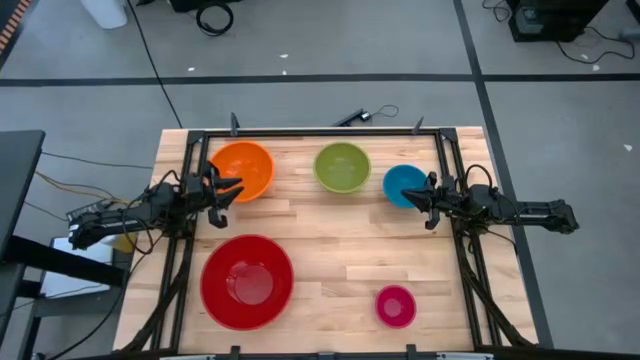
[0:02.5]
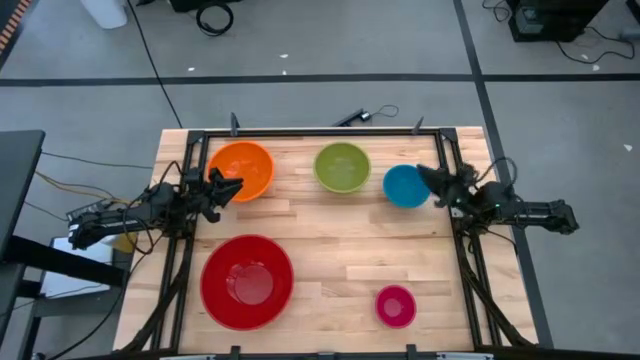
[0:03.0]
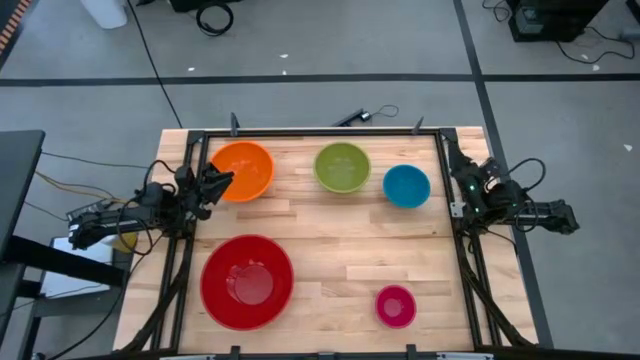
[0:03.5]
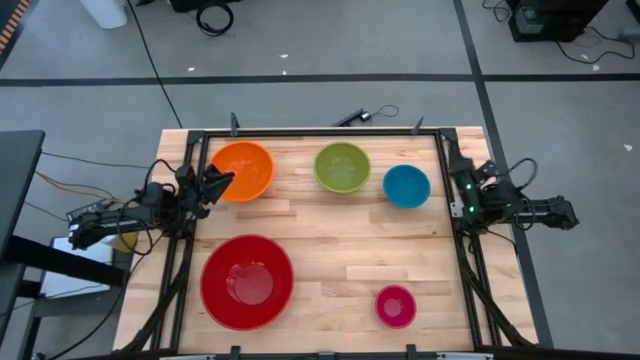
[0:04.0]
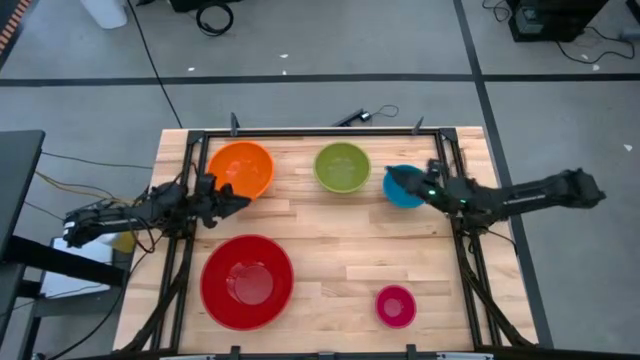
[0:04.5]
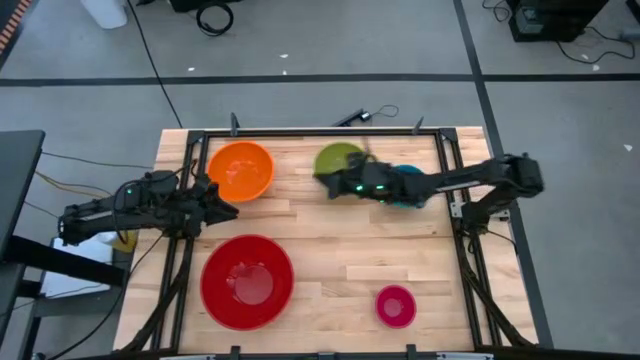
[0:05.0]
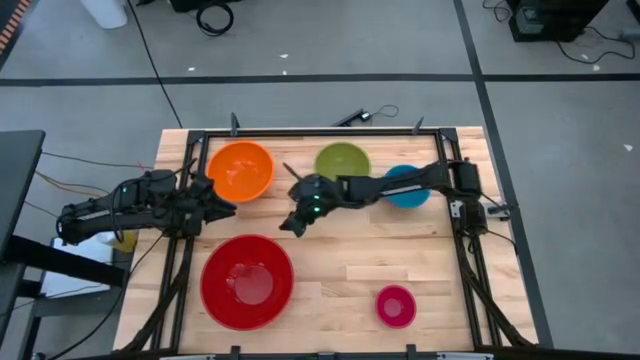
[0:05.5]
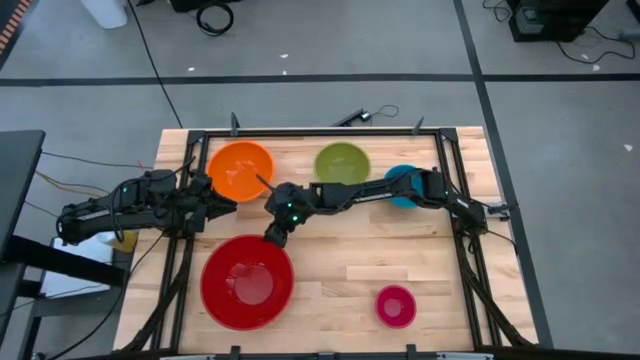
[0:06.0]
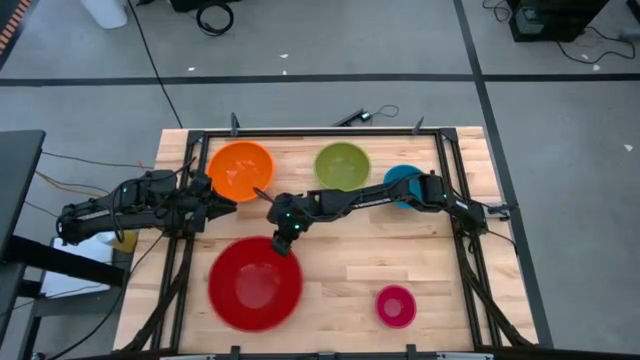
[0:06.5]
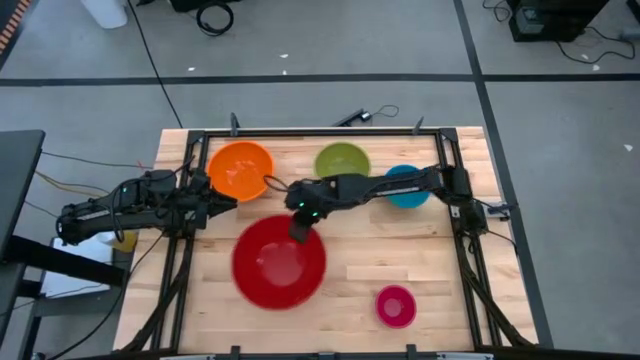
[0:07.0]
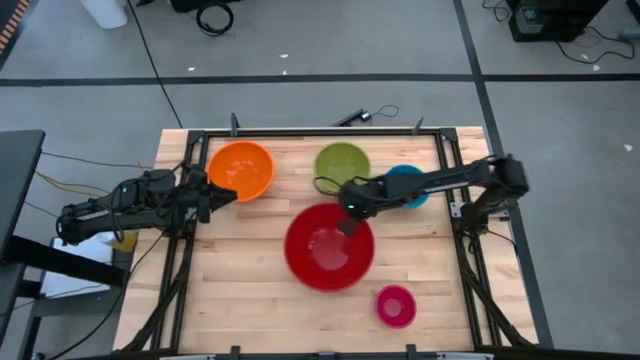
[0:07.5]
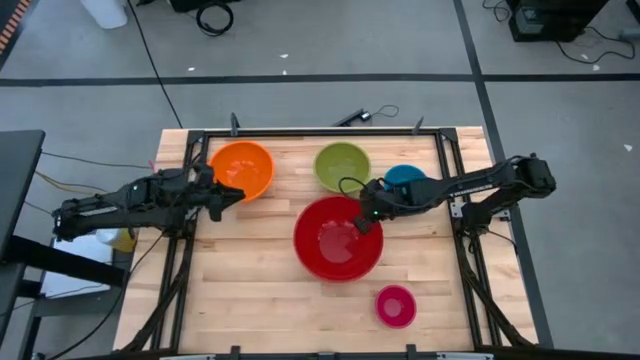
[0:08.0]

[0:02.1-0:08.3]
Move the red bowl to the center of the table

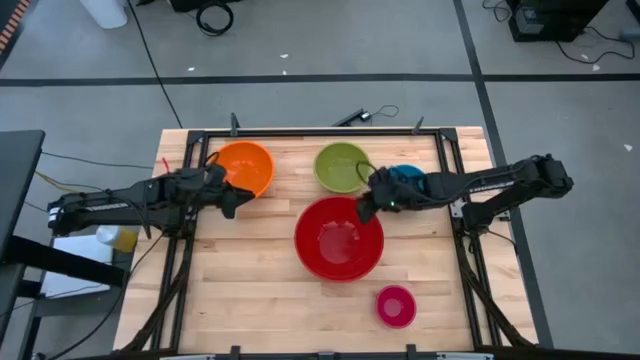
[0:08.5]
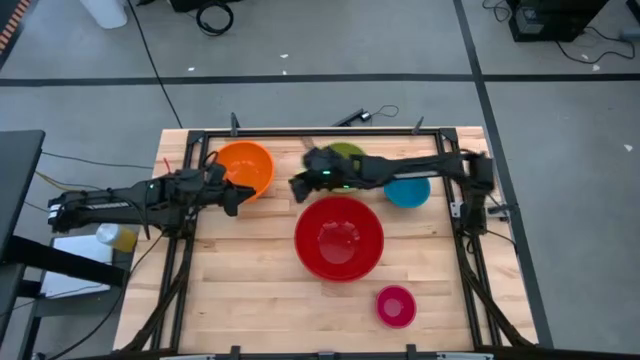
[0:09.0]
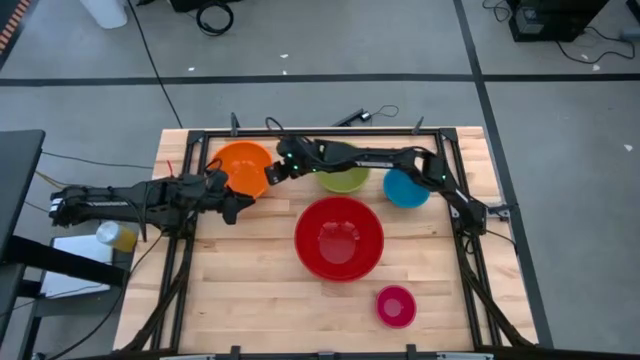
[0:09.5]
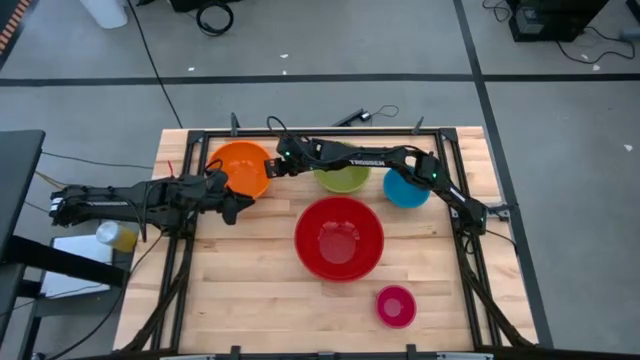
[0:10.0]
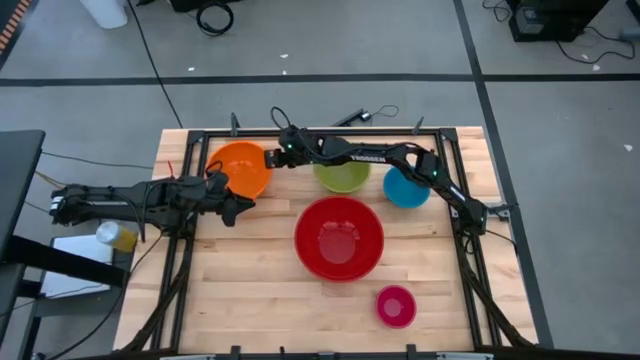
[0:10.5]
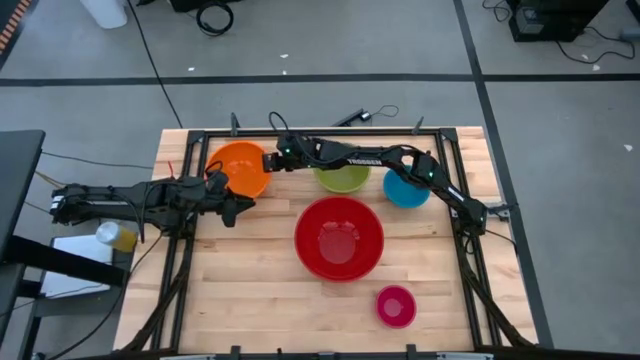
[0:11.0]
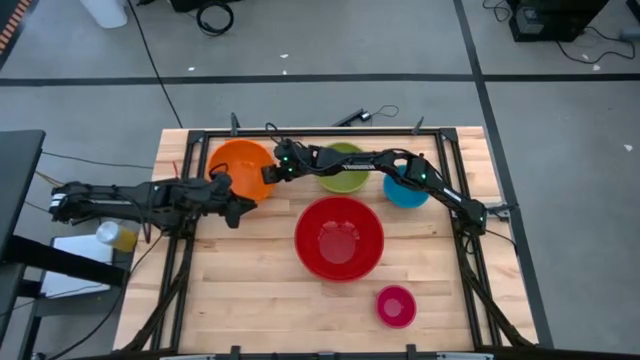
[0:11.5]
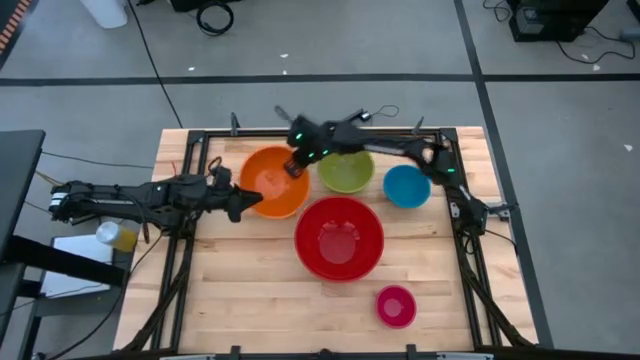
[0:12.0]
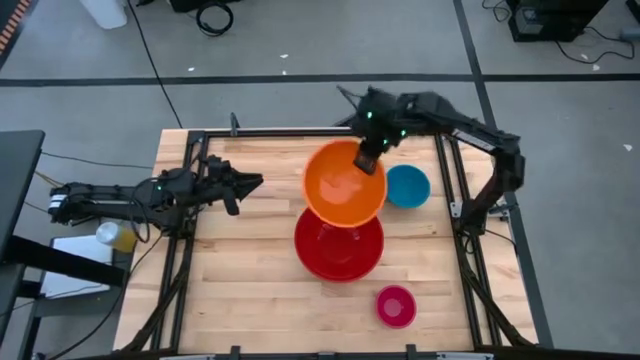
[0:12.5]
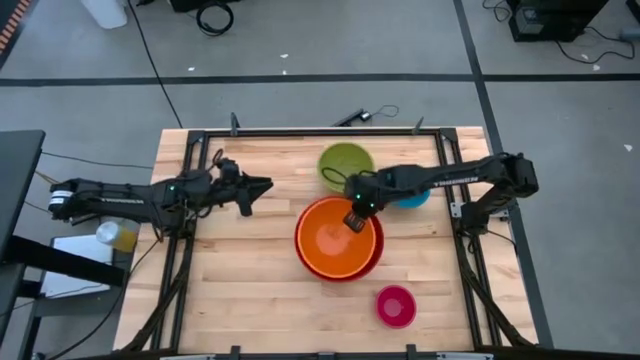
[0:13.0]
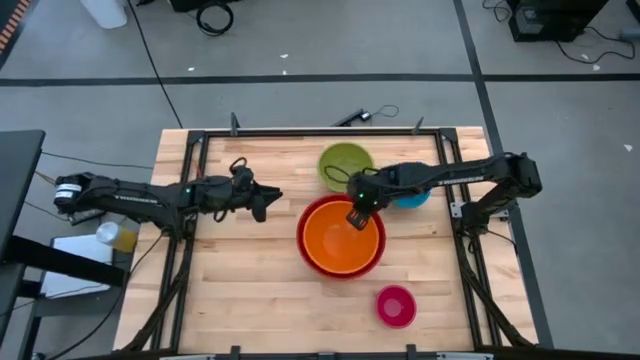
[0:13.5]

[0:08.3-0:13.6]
Stack the orange bowl on top of the red bowl

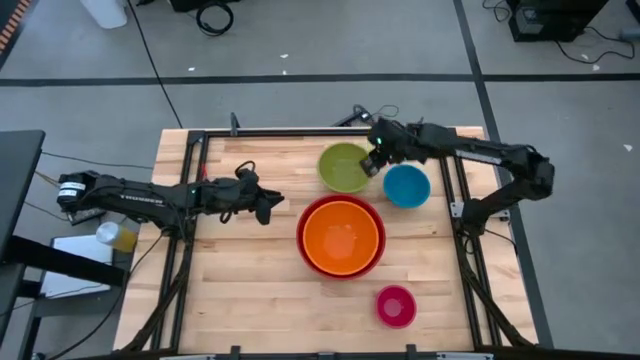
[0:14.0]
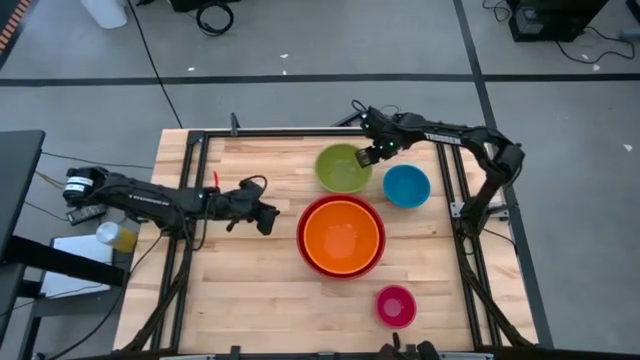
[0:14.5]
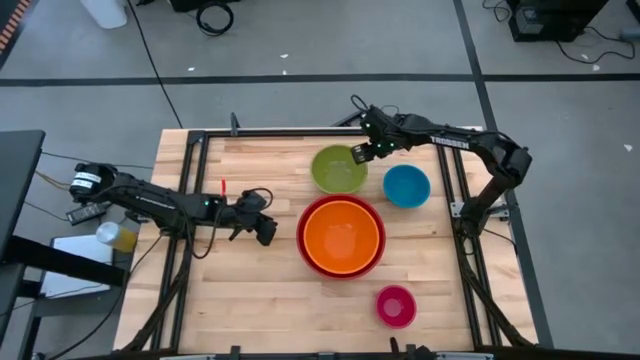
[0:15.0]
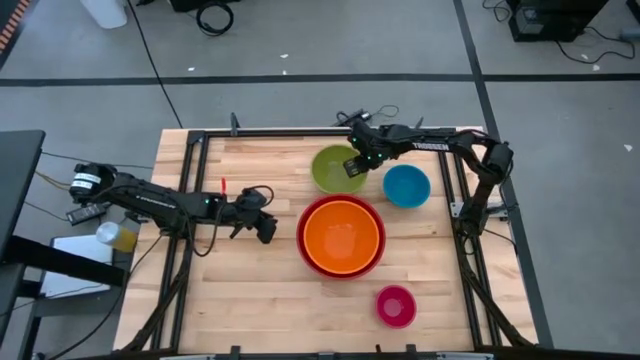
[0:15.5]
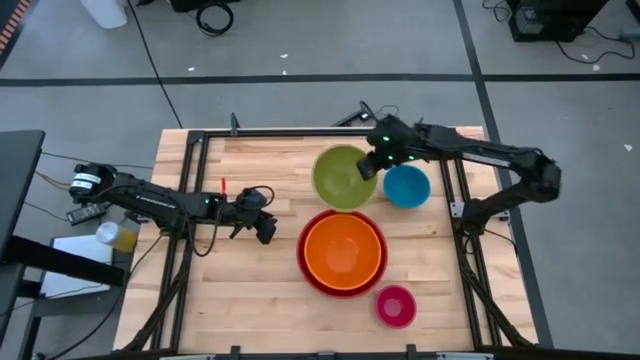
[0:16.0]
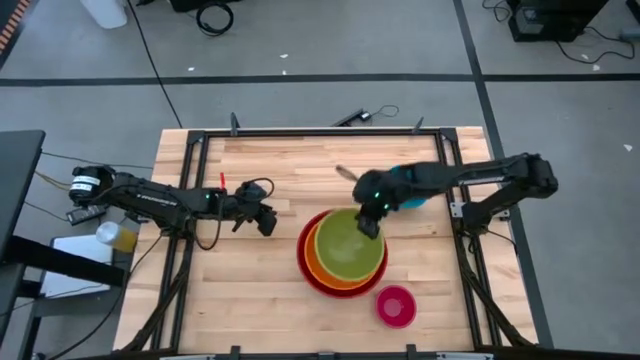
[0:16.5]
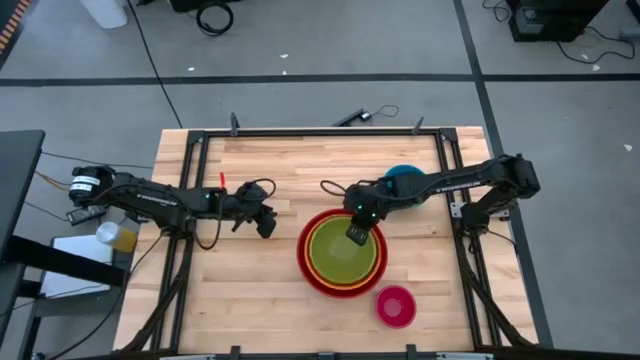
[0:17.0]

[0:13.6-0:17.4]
Stack the green bowl on top of the orange bowl

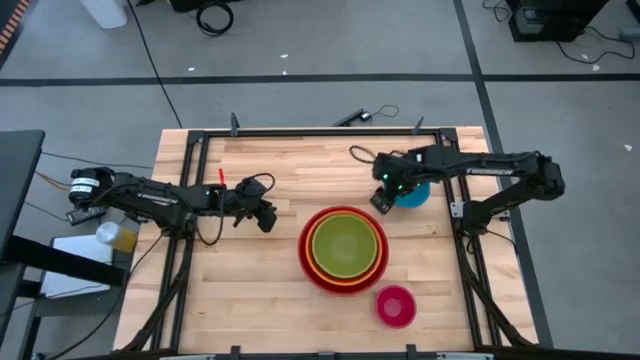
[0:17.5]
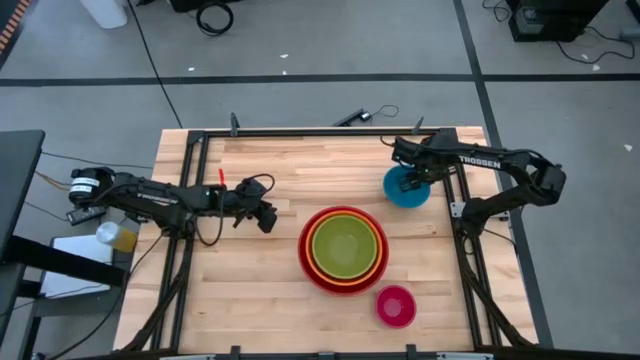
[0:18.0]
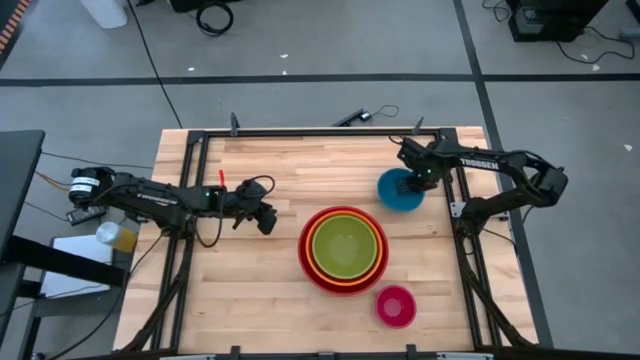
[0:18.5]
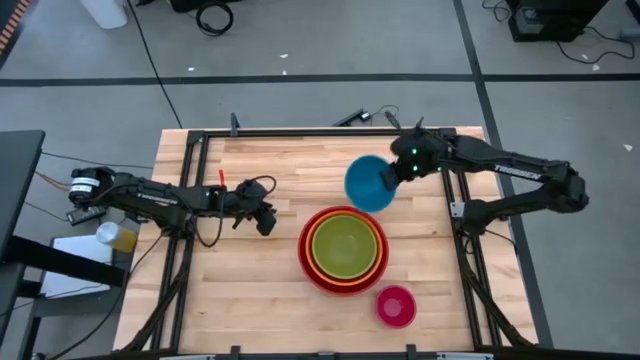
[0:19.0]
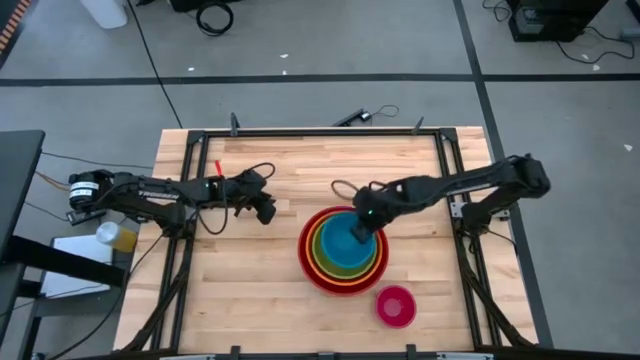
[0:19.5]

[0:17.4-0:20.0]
Stack the blue bowl on top of the green bowl

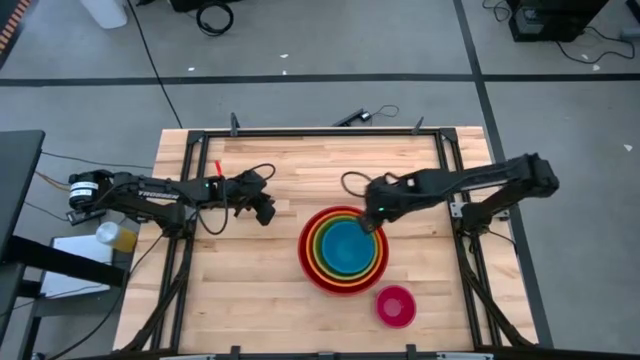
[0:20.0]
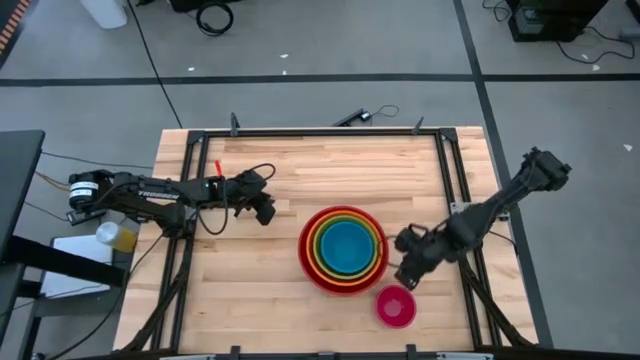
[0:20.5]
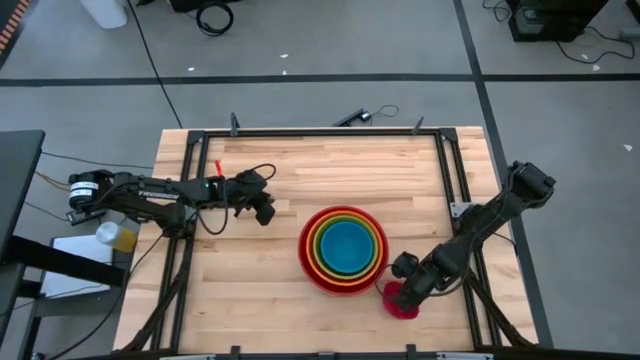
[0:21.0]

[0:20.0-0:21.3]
Stack the pink bowl on top of the blue bowl

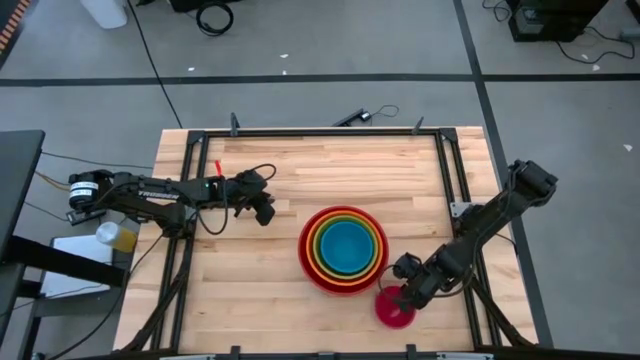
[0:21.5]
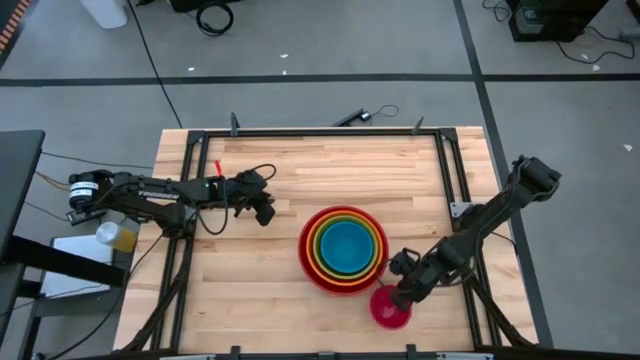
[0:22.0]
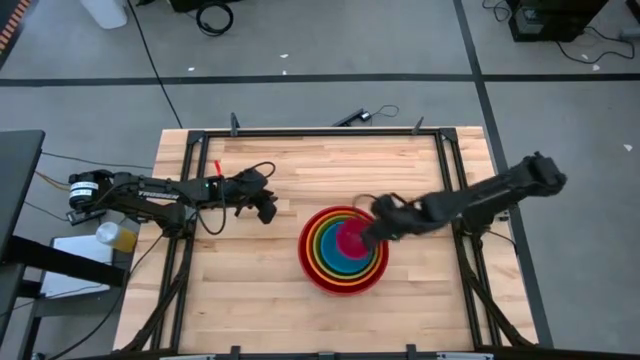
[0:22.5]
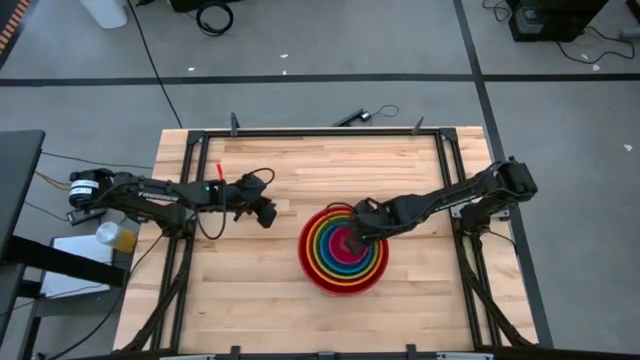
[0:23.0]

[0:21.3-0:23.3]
Stack the pink bowl on top of the blue bowl
